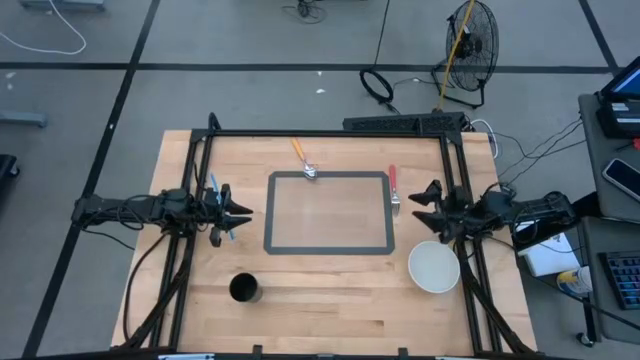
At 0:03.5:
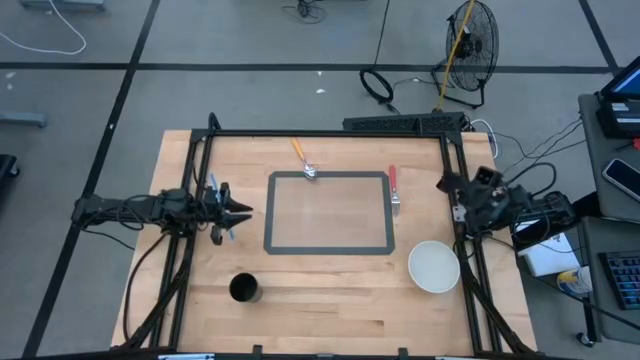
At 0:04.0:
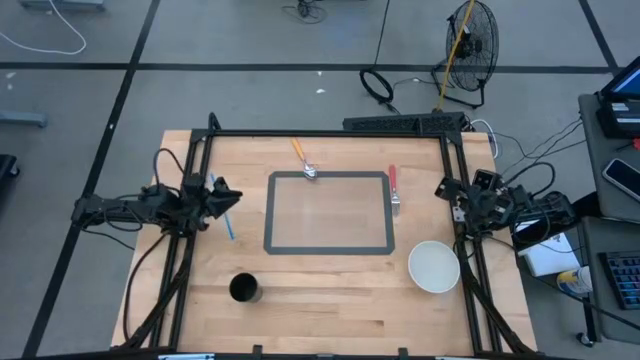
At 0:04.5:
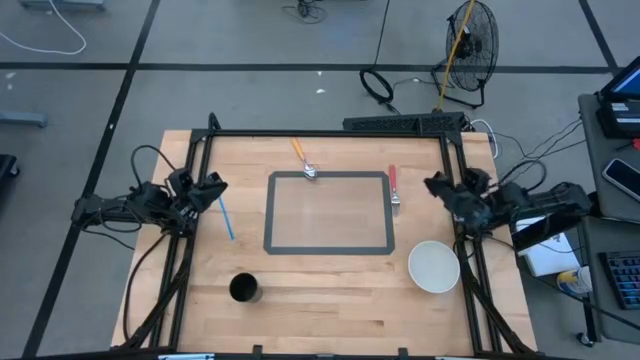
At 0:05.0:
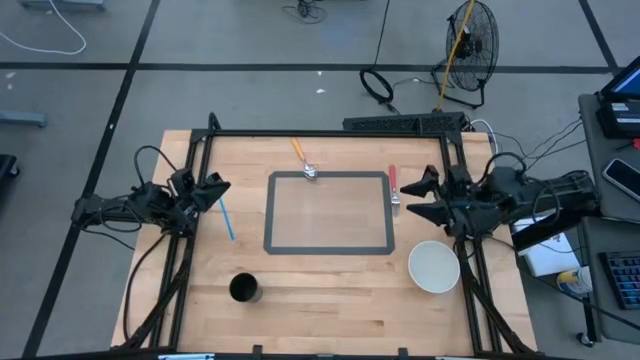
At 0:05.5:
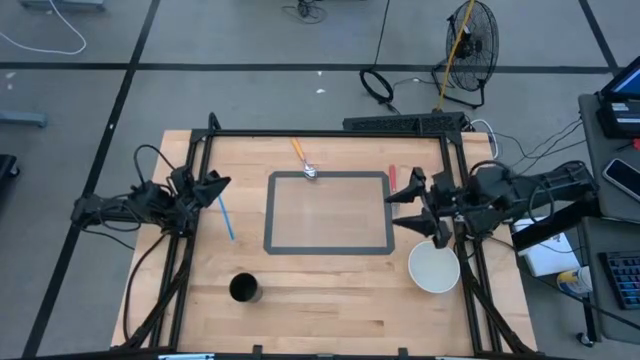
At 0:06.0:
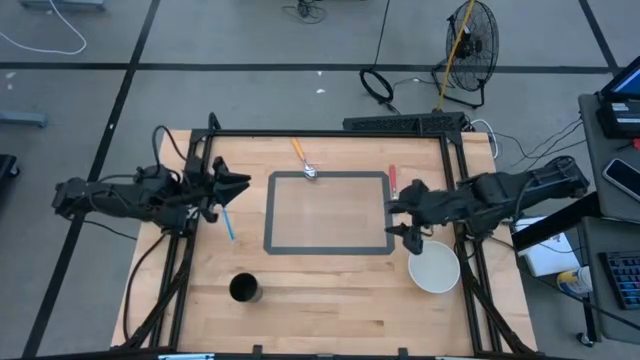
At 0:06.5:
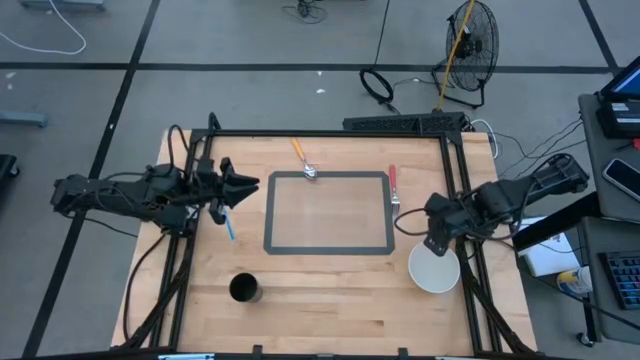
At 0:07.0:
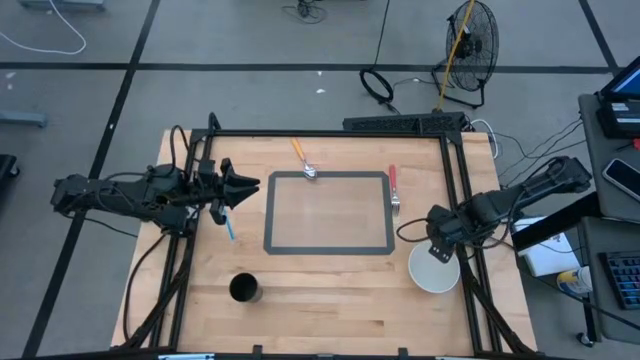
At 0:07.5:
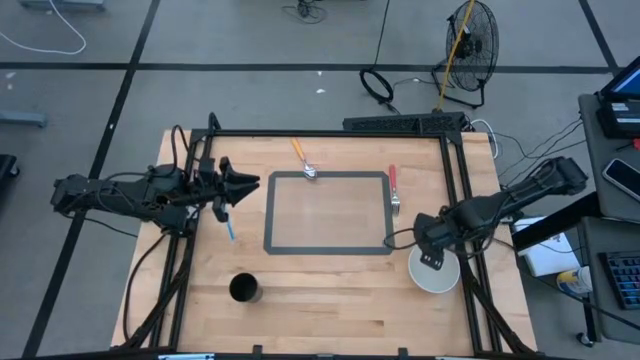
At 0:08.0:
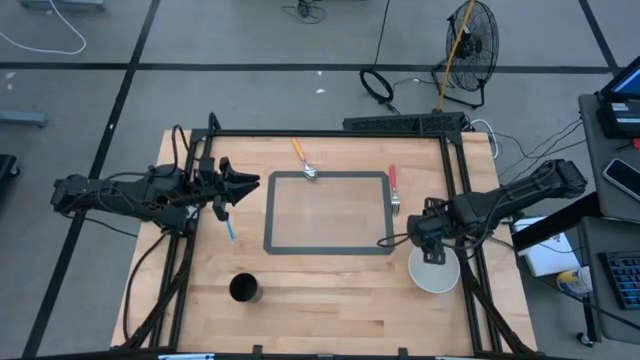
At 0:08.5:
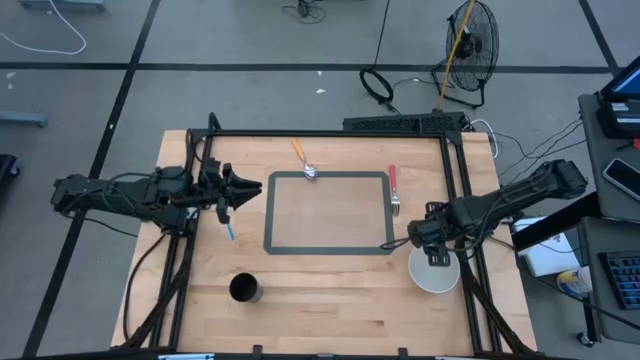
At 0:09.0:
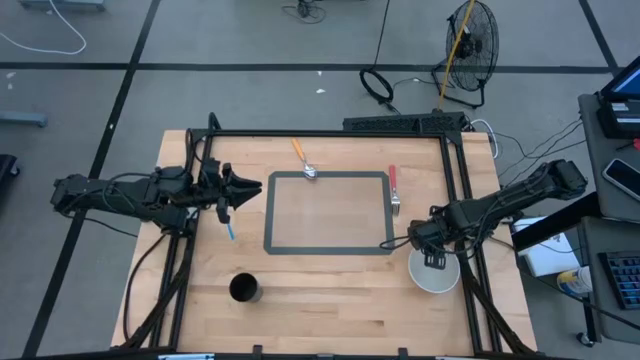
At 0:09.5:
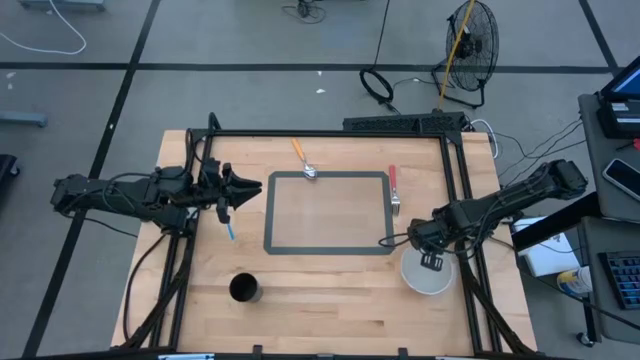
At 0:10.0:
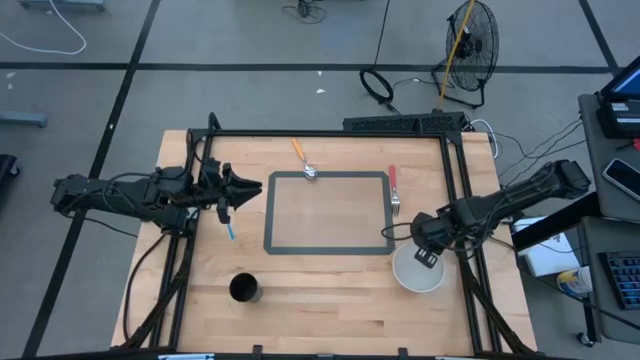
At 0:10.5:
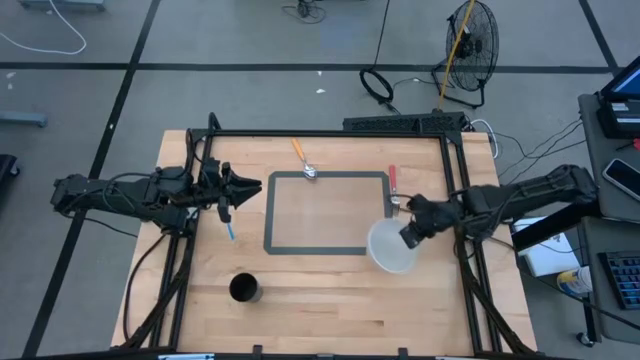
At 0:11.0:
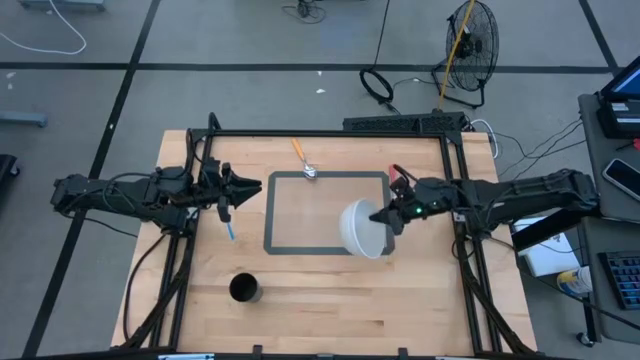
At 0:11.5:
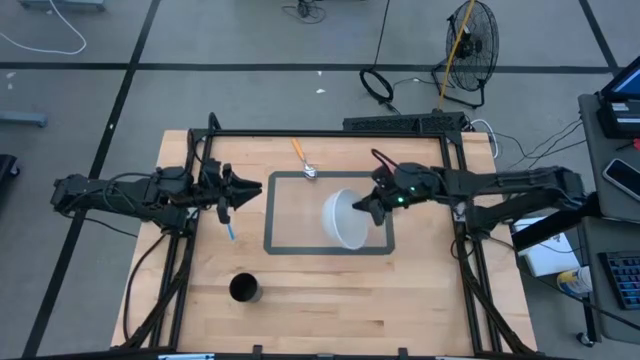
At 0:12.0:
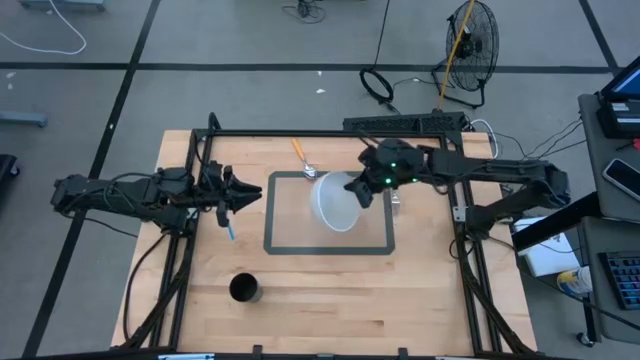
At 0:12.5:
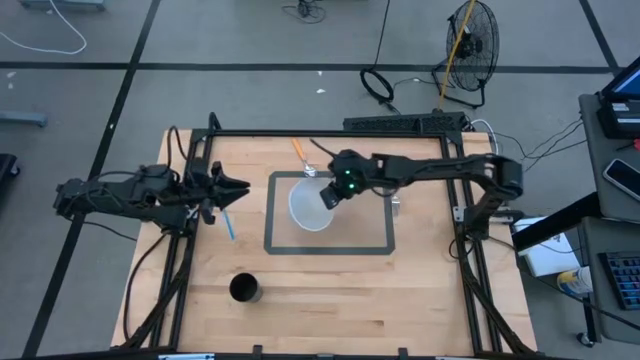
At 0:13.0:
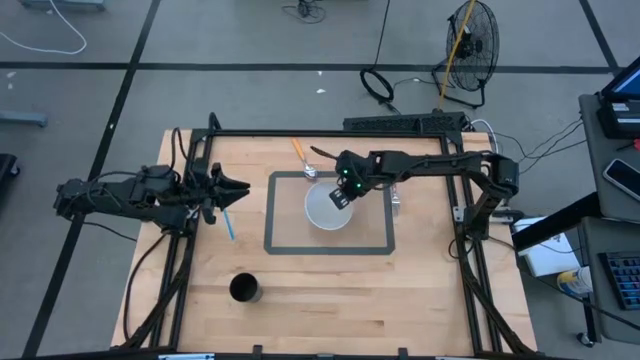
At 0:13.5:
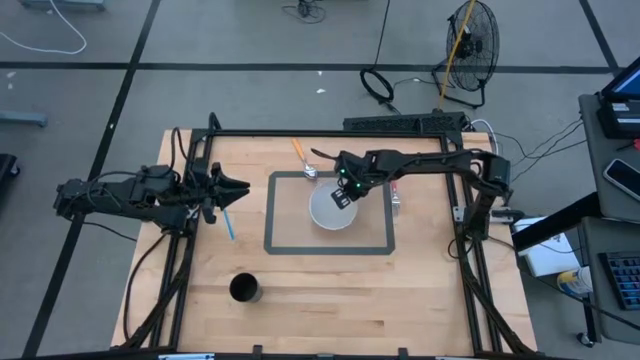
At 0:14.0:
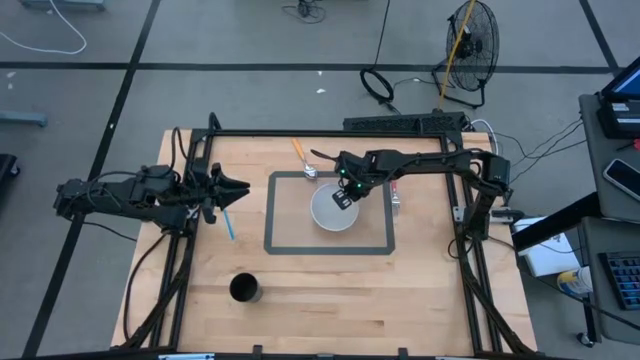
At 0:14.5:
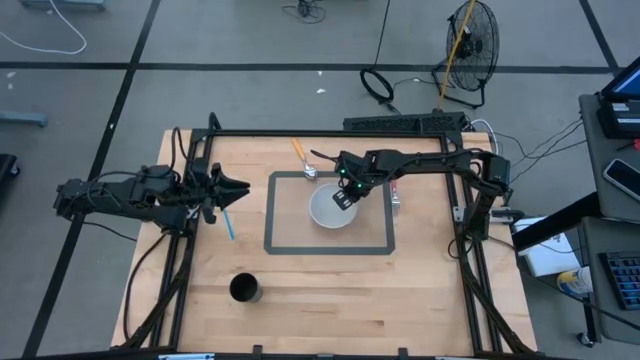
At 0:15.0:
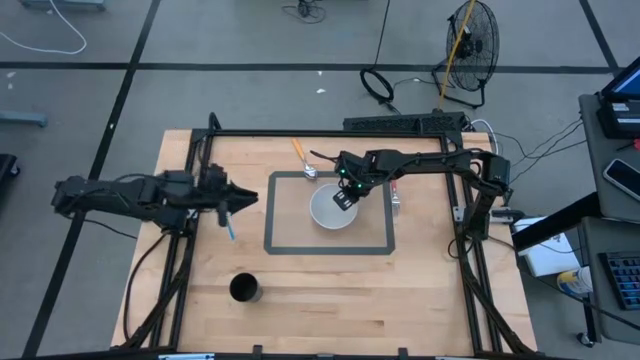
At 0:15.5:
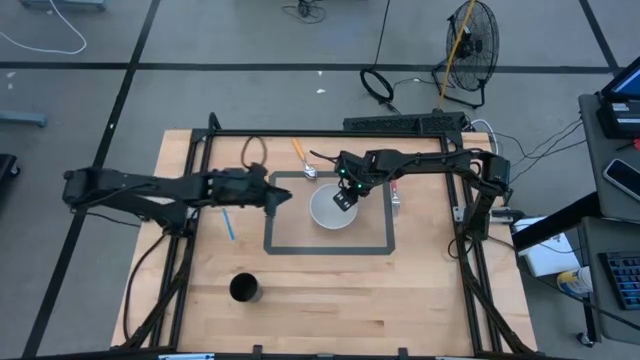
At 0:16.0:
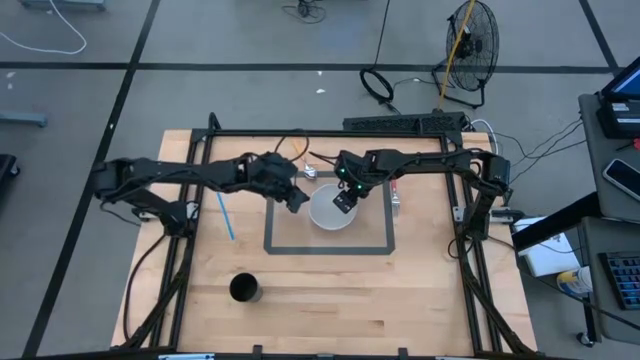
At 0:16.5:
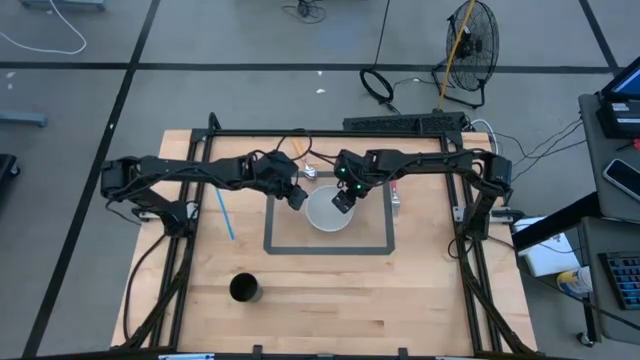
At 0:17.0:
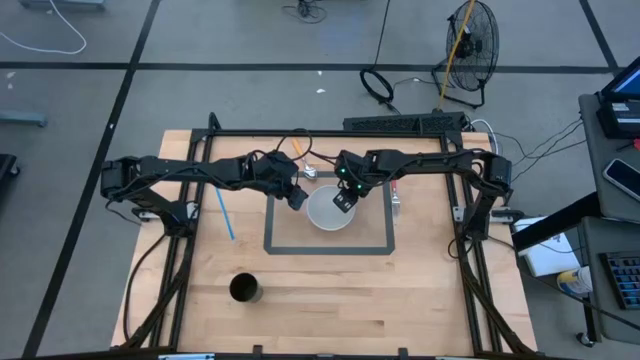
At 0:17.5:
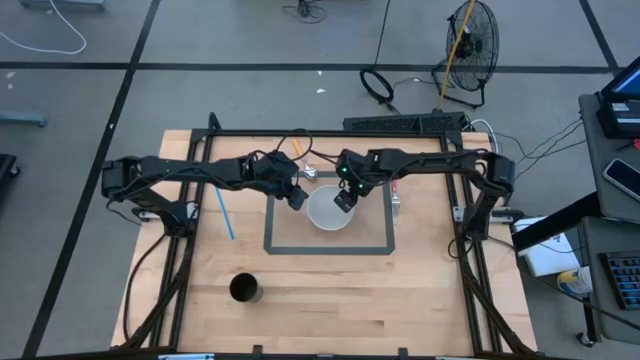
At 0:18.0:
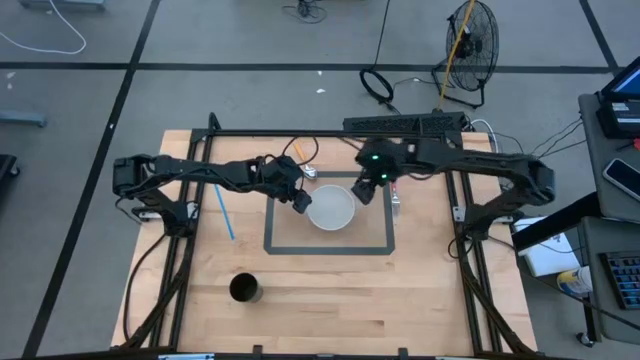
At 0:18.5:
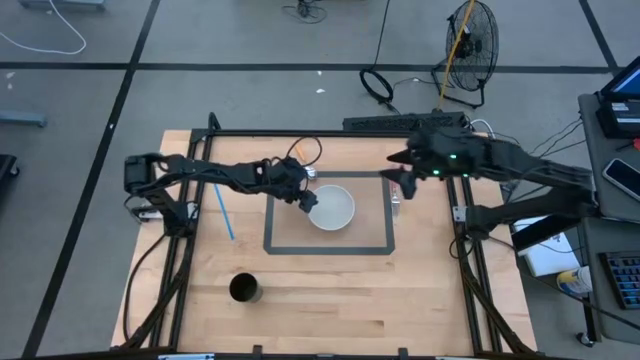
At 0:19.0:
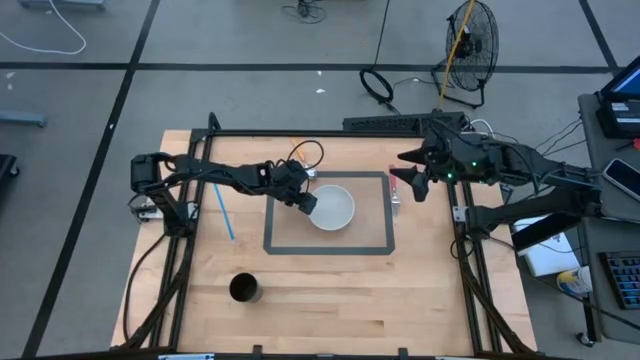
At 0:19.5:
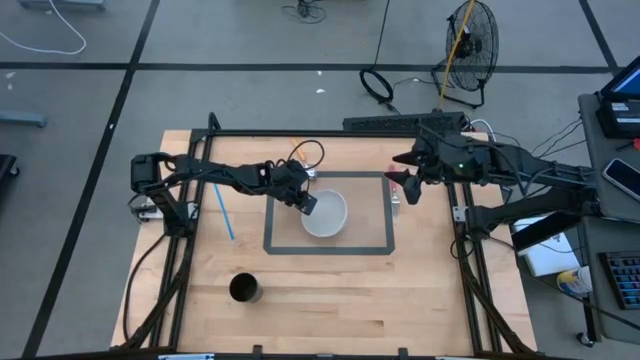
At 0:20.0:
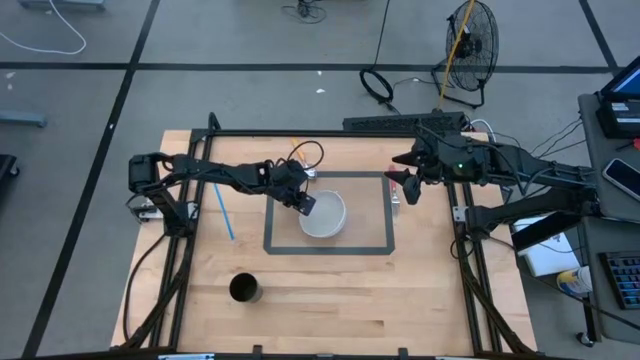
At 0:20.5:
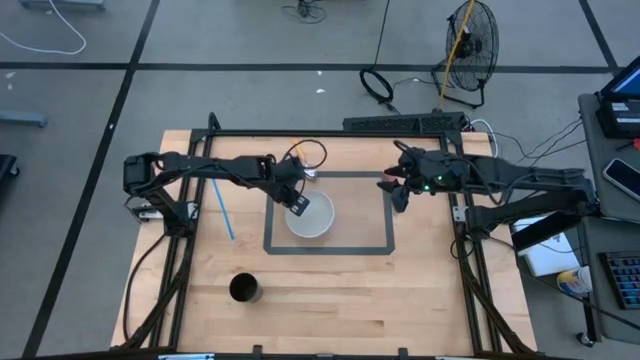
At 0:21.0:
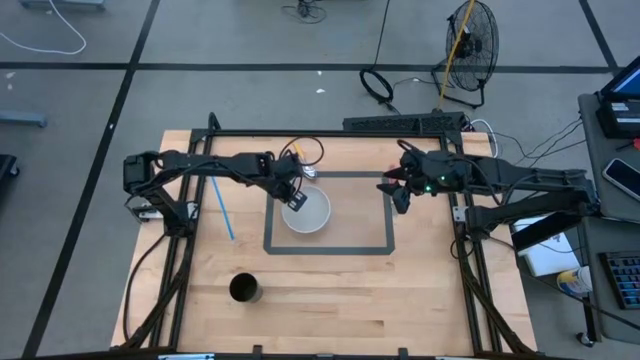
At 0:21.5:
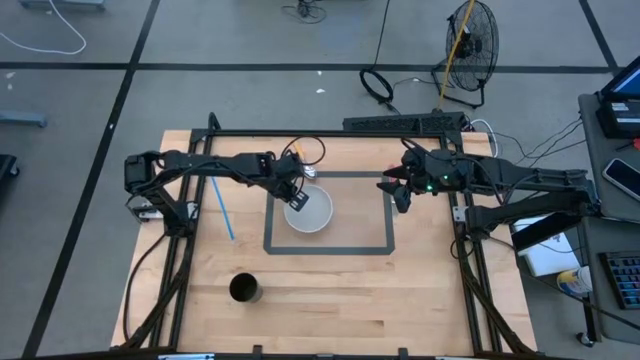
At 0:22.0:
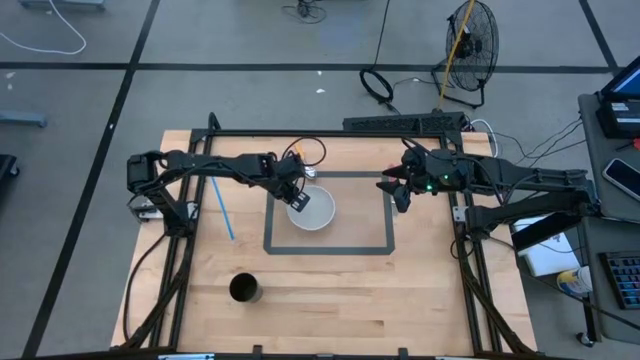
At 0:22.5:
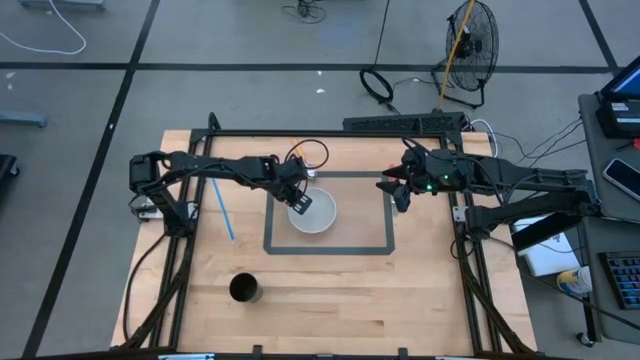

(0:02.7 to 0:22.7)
Task: Pick & Place Utensil
Put the white bowl on the table mat
